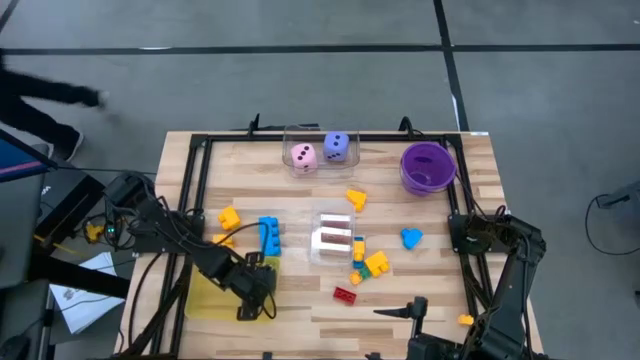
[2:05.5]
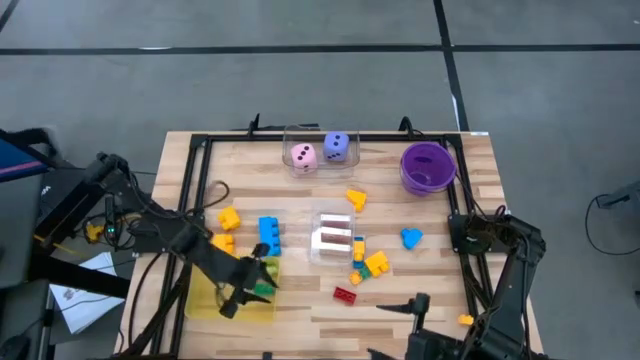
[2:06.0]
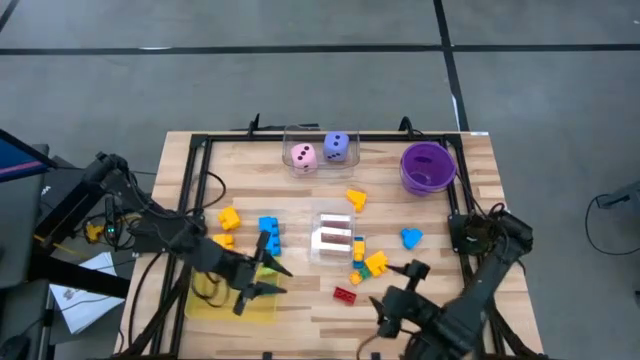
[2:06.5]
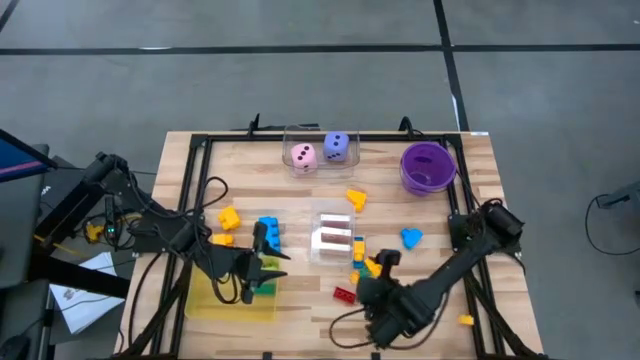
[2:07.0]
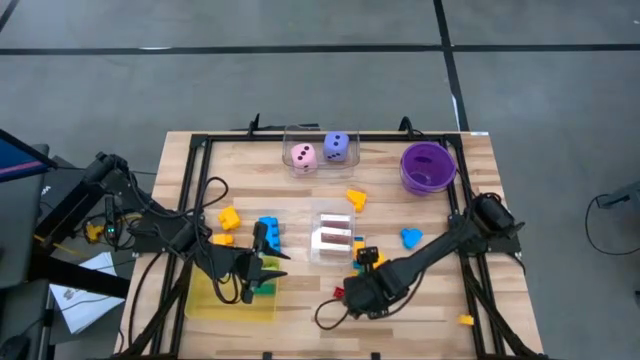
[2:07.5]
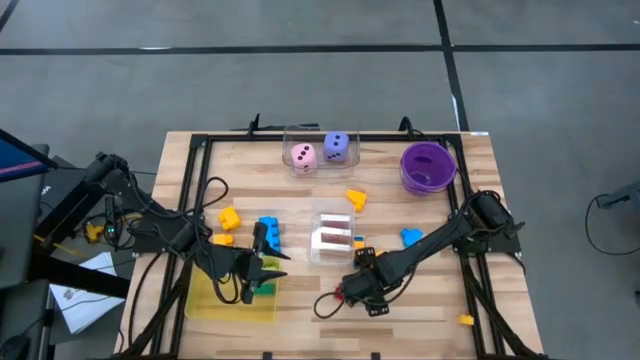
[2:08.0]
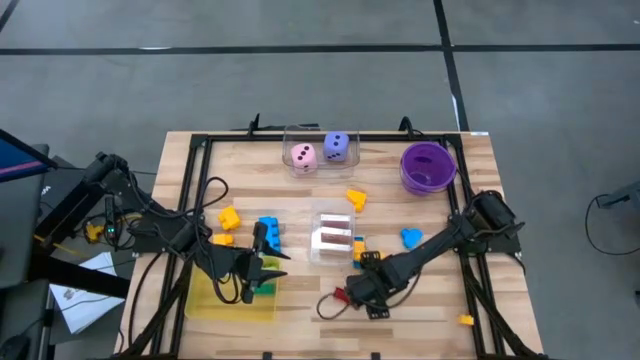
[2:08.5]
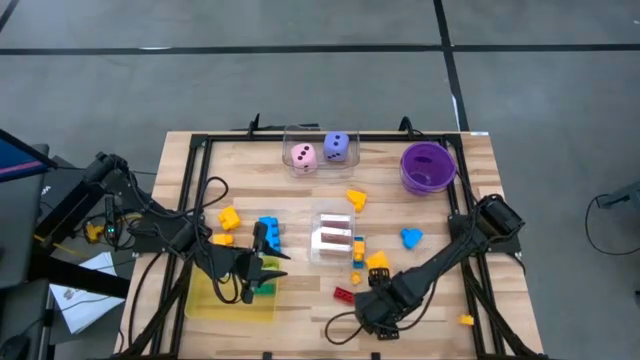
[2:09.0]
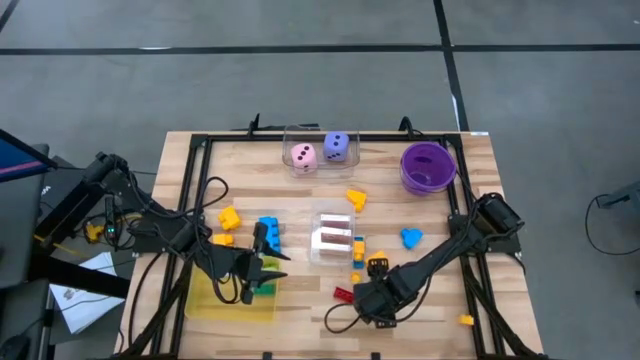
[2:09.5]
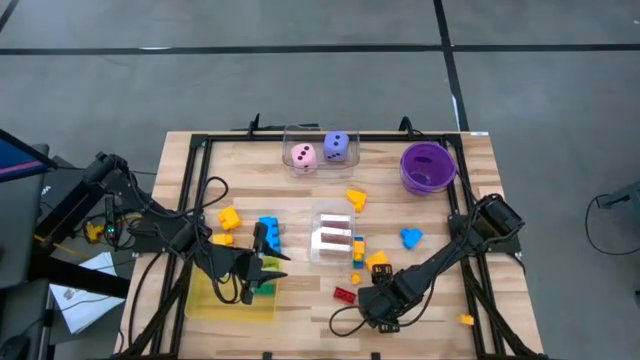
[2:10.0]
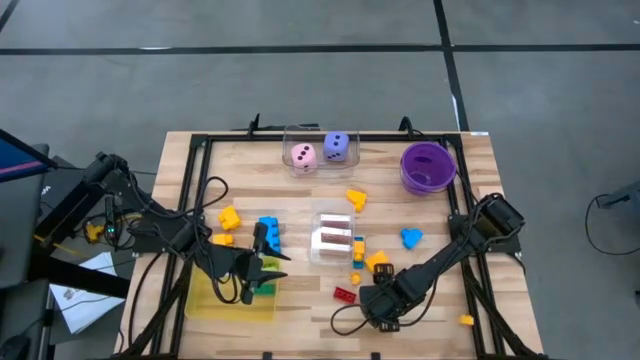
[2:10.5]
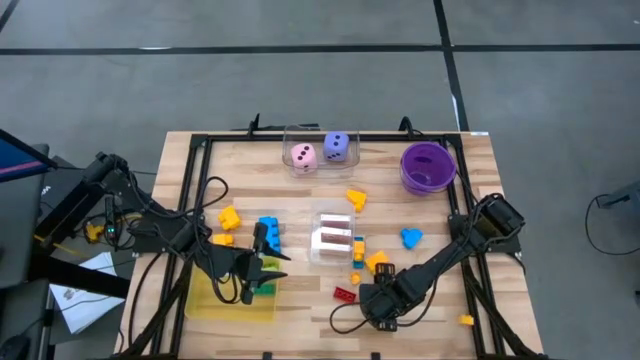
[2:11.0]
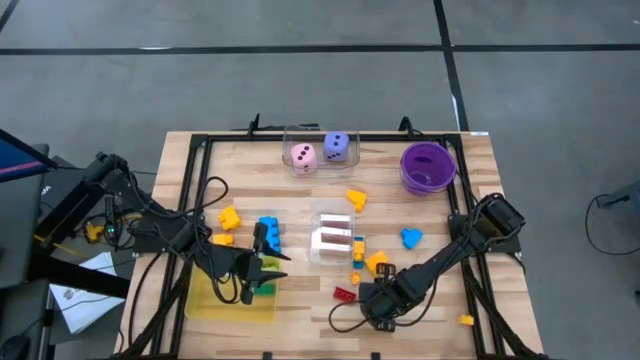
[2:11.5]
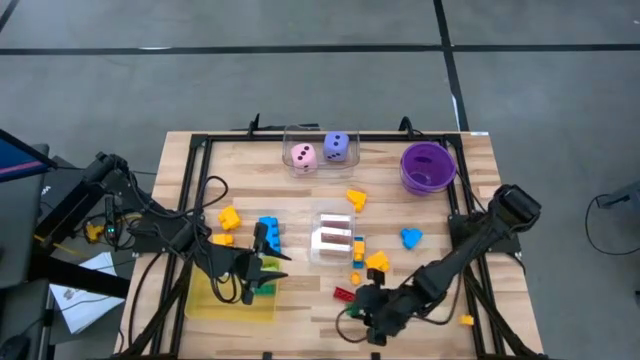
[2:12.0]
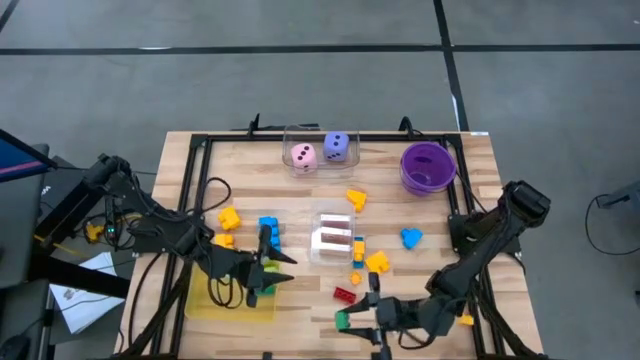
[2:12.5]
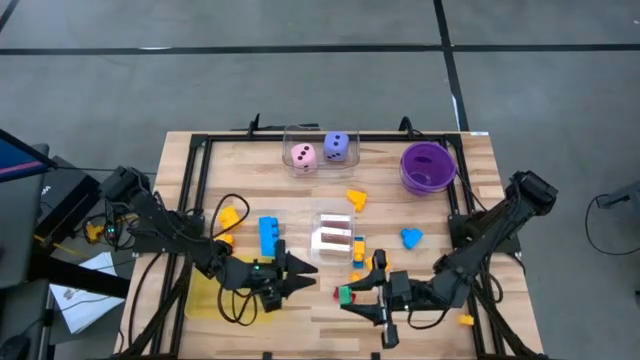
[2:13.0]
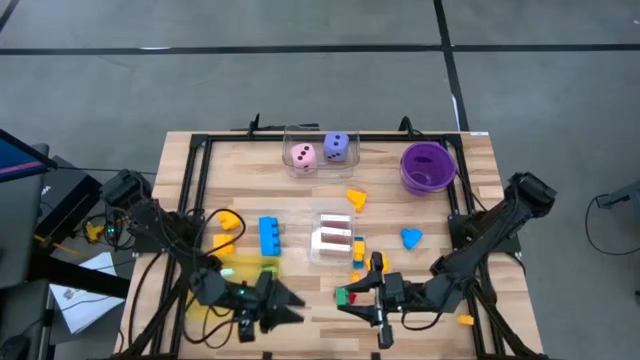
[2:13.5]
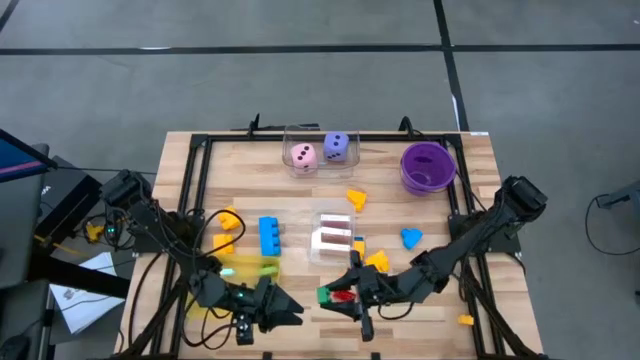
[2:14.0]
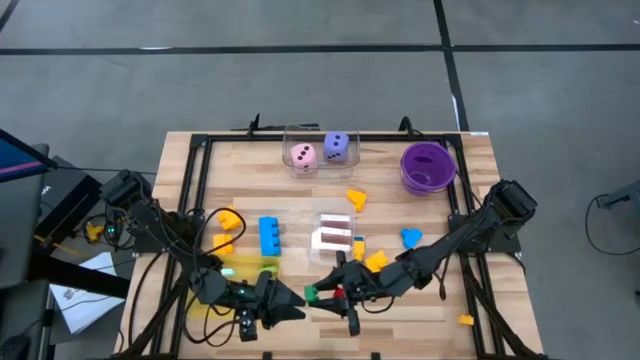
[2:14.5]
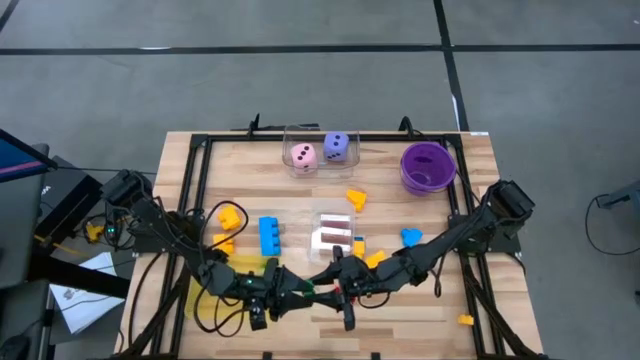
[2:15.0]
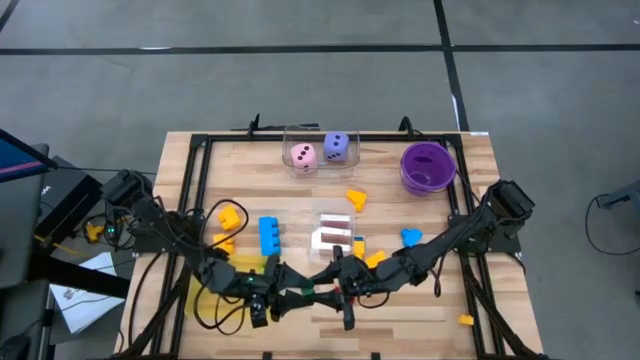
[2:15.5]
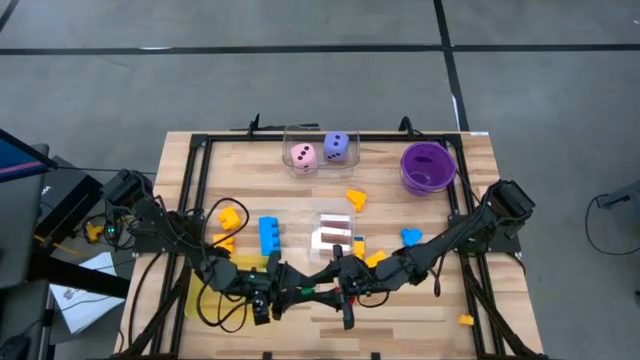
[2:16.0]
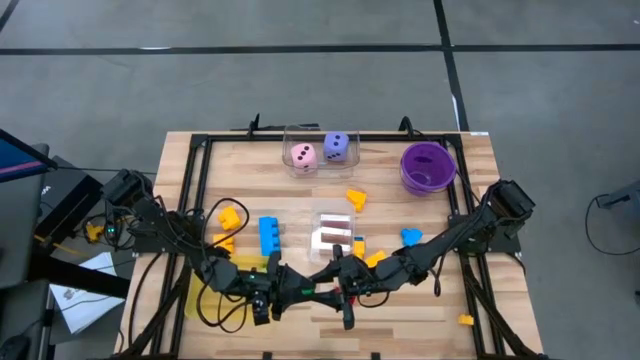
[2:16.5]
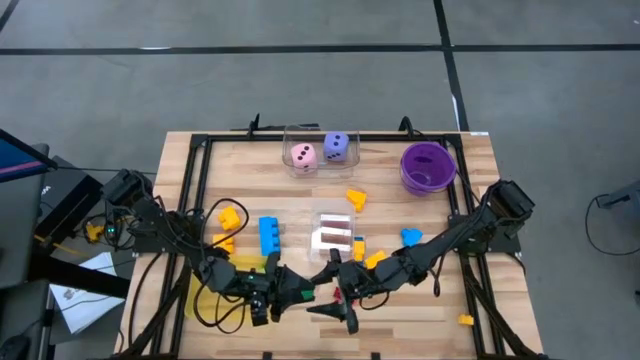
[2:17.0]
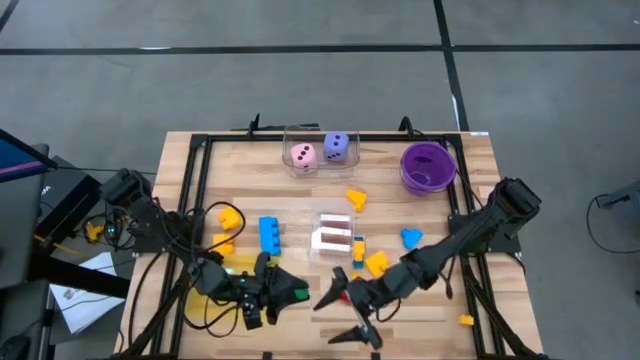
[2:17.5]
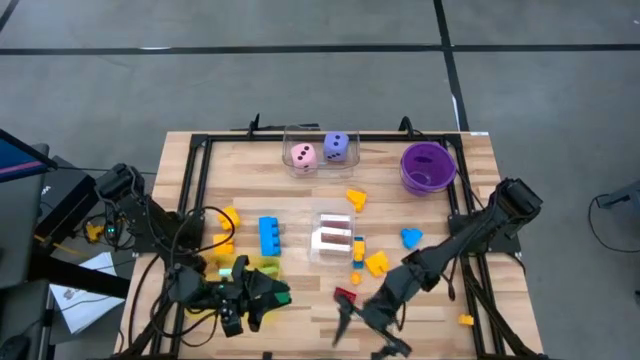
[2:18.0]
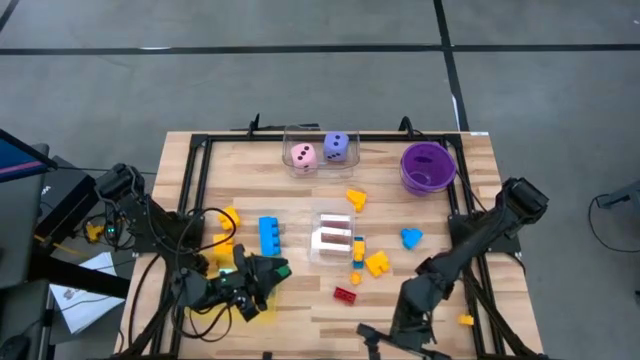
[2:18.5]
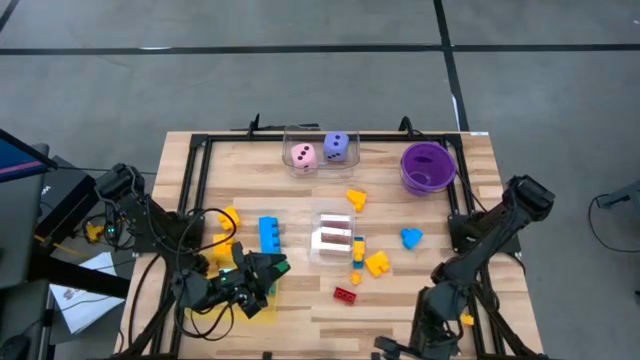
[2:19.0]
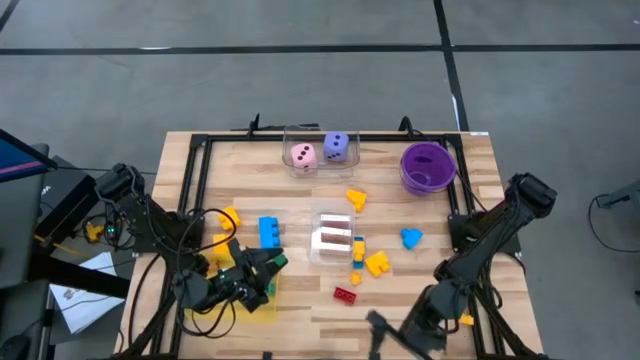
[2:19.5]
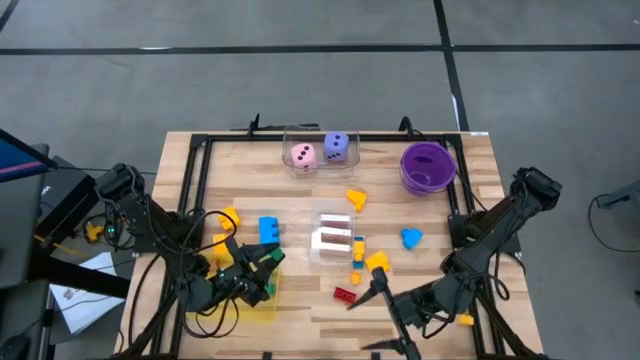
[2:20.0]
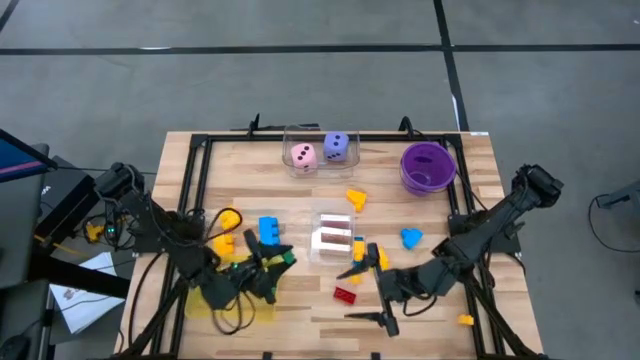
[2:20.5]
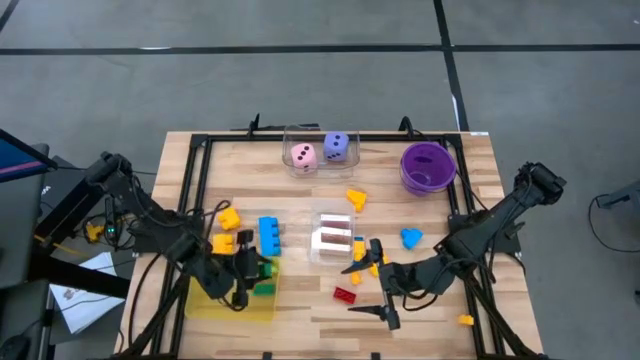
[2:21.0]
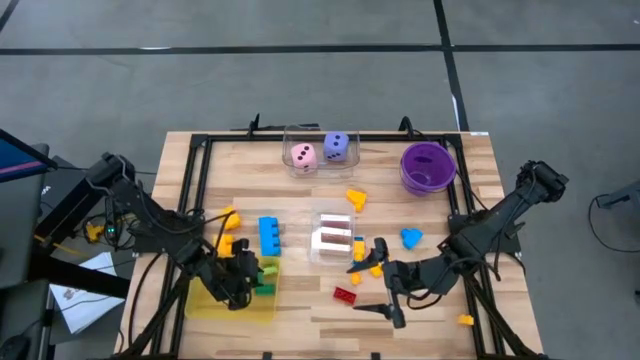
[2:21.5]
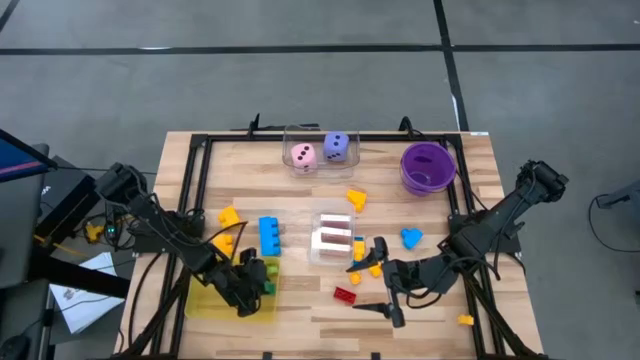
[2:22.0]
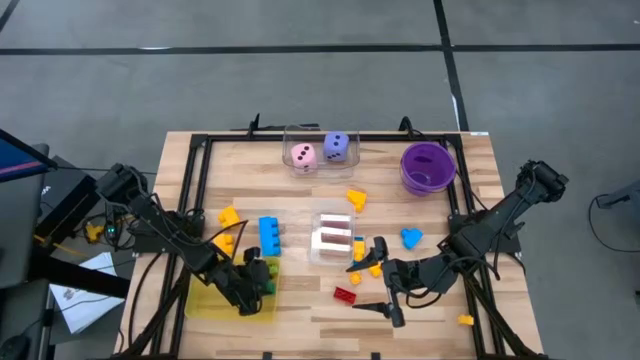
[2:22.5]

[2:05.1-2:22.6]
Task: Pick & Place Toys
Put the green game piece into the yellow bin

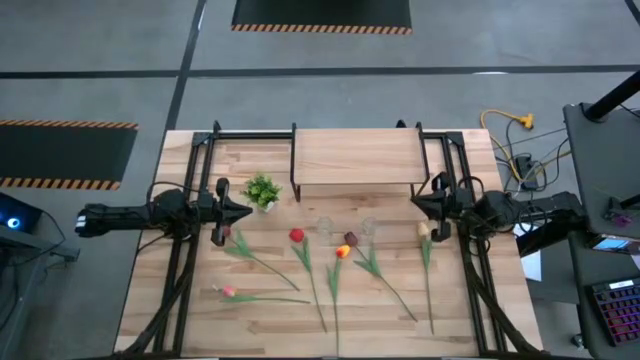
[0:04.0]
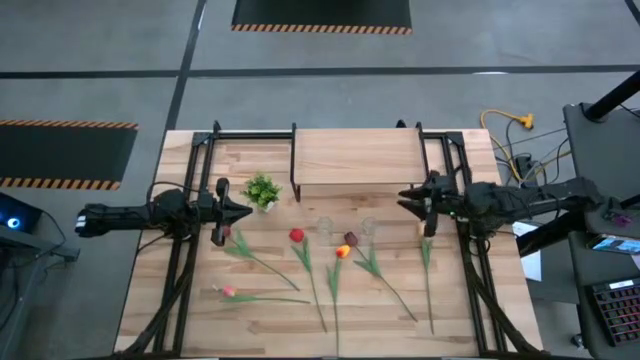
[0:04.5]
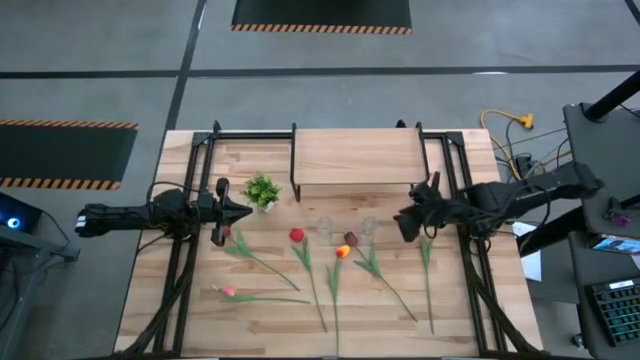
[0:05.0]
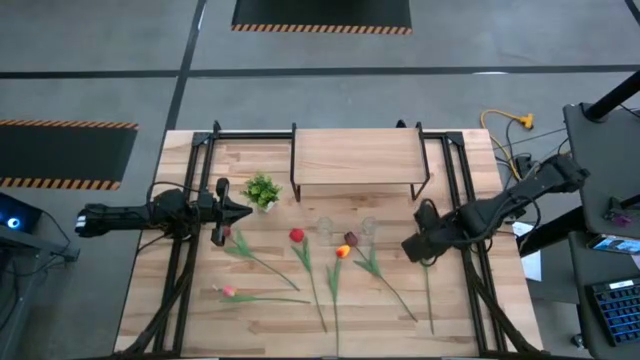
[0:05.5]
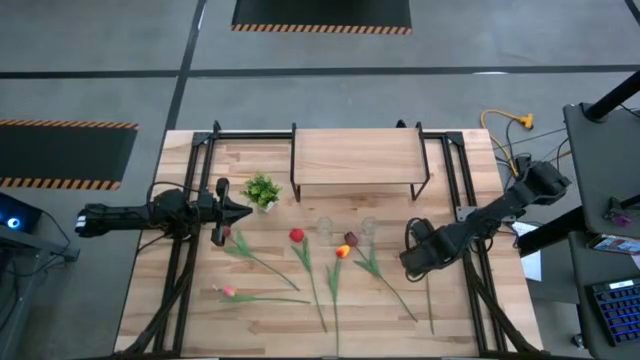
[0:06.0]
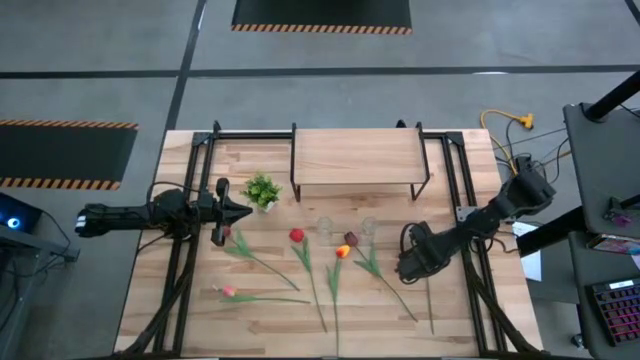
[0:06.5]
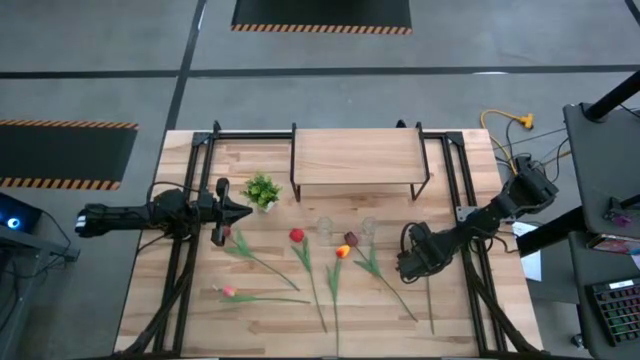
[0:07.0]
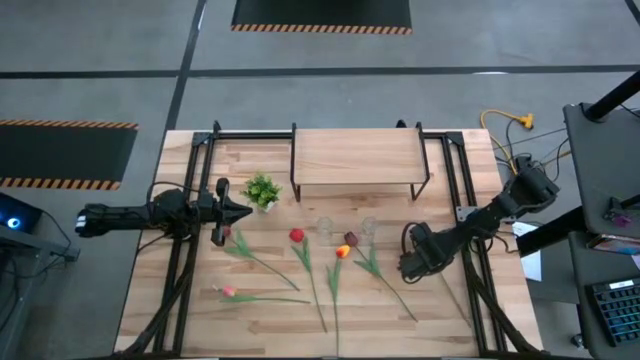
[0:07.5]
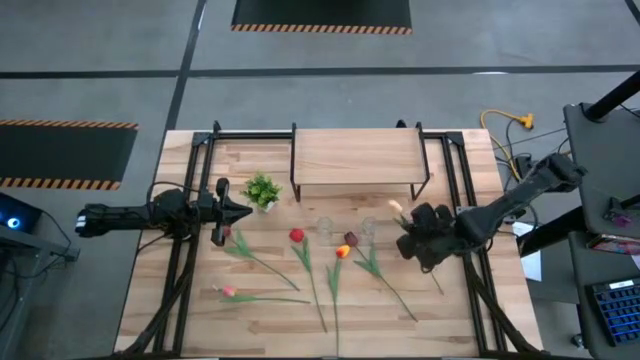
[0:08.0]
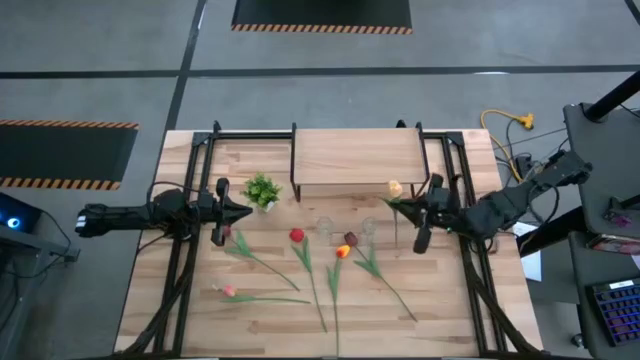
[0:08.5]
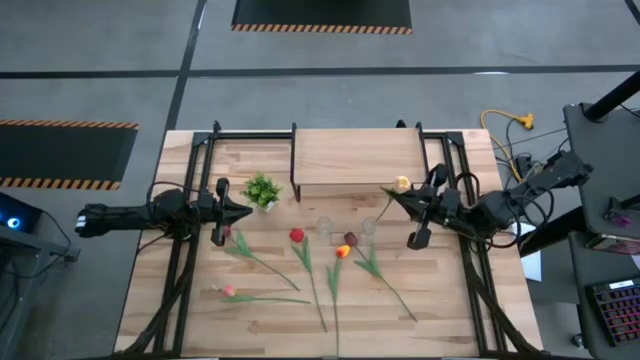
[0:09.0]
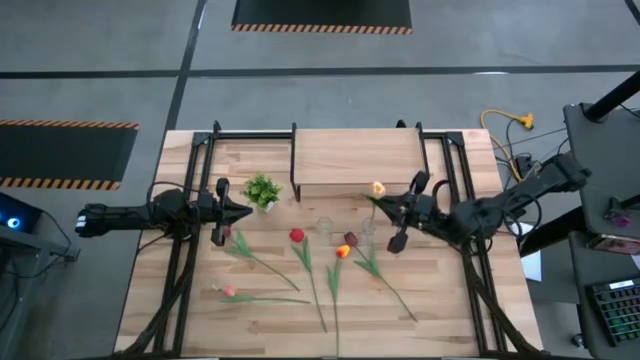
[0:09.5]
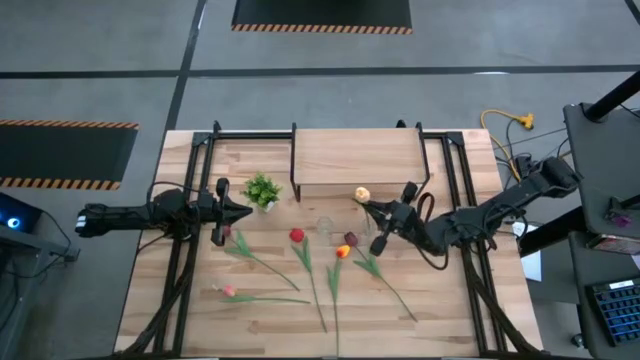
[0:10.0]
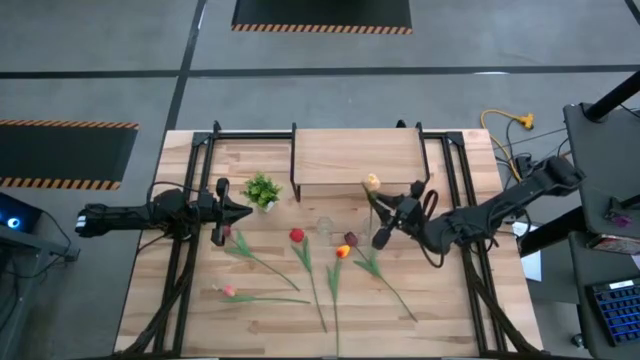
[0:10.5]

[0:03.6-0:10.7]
Task: Pick and place flowers into a vace then onto a shelf
Put the light yellow tulip into the right transparent vase
